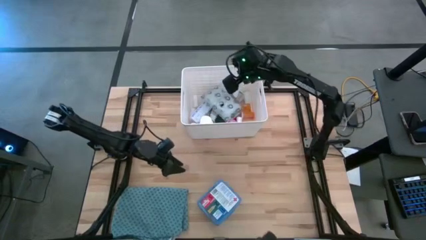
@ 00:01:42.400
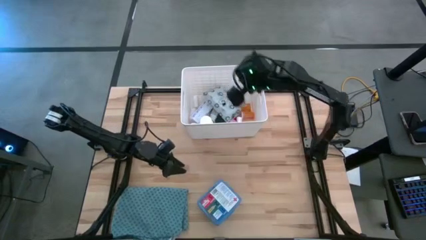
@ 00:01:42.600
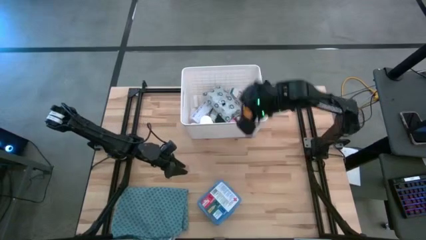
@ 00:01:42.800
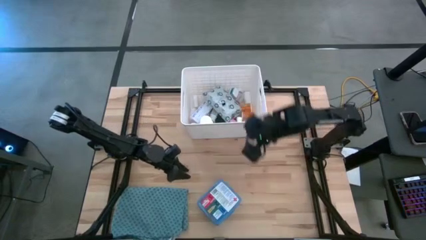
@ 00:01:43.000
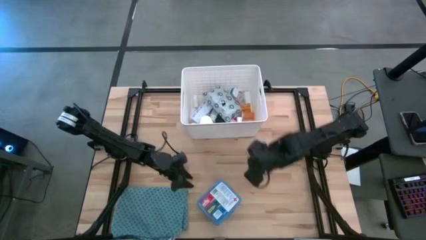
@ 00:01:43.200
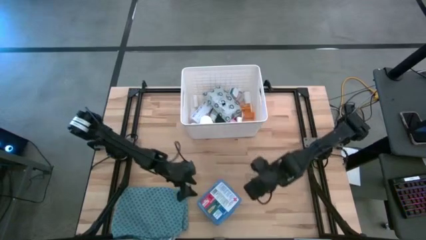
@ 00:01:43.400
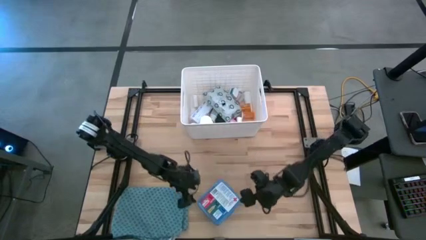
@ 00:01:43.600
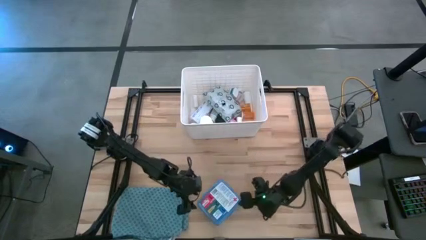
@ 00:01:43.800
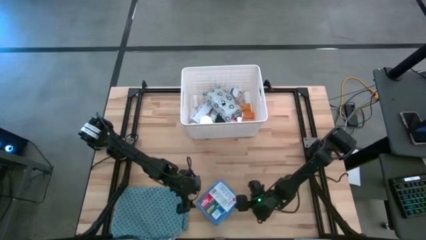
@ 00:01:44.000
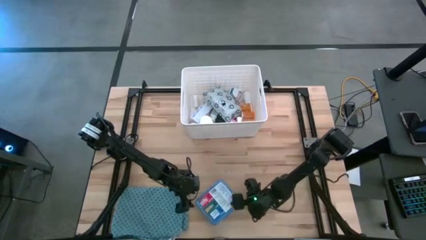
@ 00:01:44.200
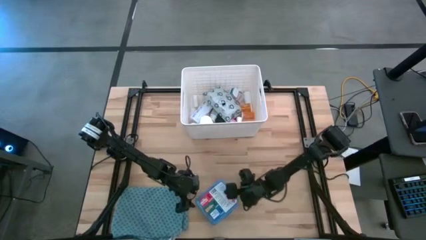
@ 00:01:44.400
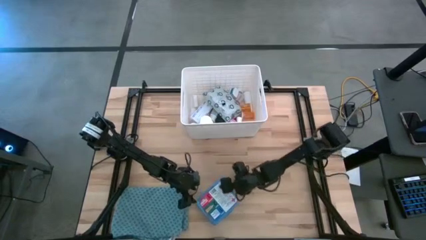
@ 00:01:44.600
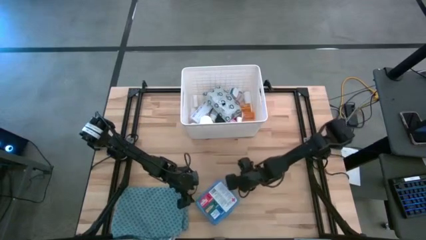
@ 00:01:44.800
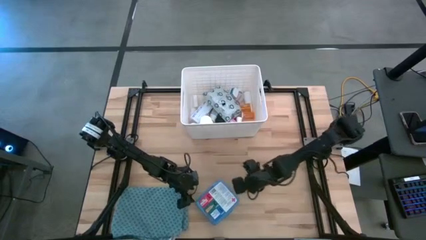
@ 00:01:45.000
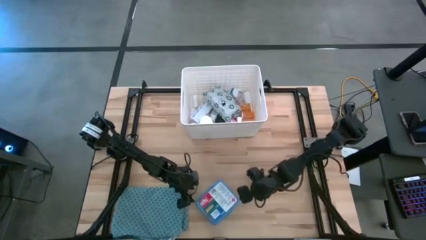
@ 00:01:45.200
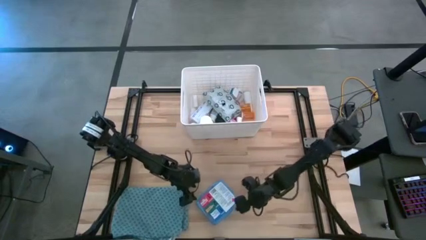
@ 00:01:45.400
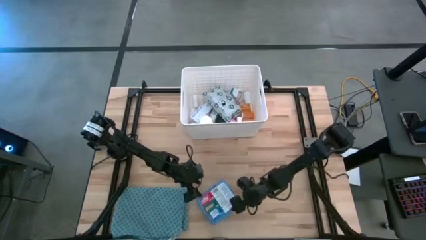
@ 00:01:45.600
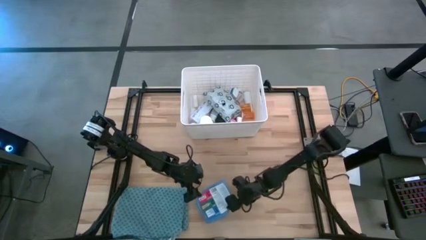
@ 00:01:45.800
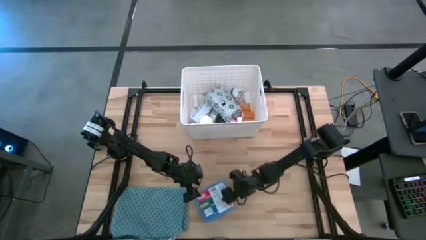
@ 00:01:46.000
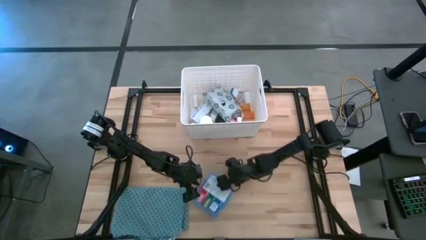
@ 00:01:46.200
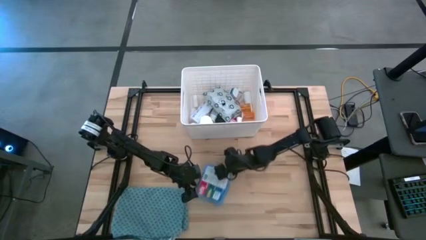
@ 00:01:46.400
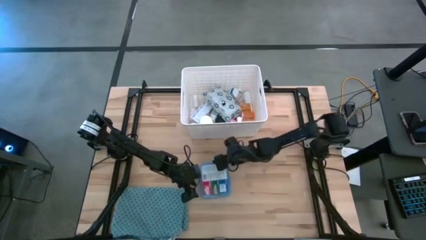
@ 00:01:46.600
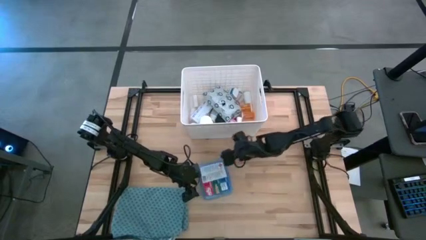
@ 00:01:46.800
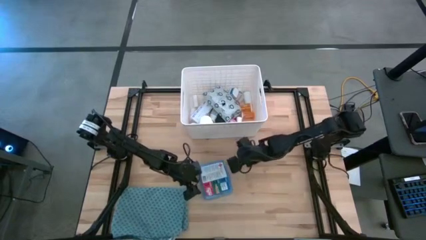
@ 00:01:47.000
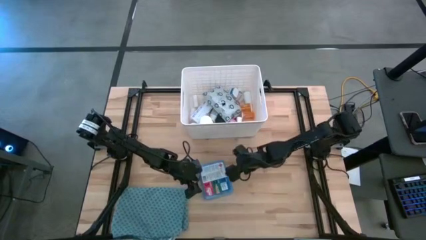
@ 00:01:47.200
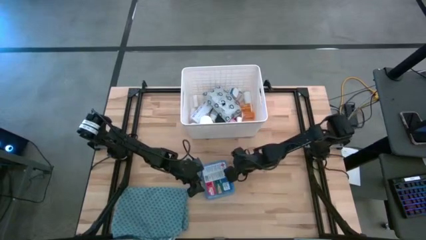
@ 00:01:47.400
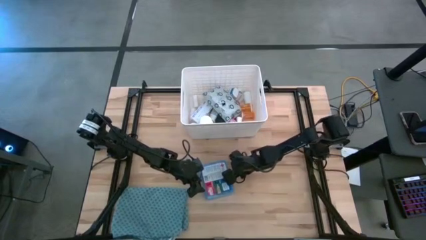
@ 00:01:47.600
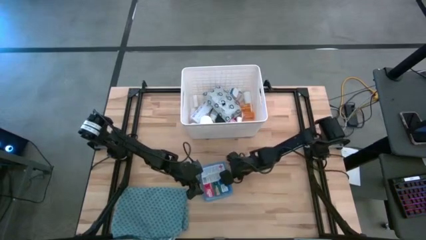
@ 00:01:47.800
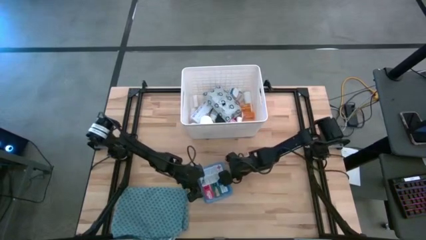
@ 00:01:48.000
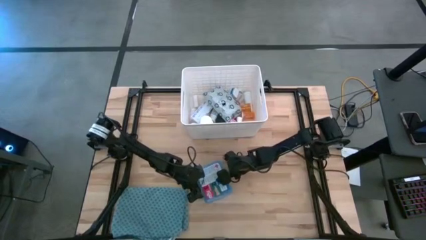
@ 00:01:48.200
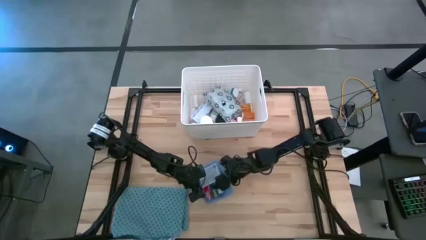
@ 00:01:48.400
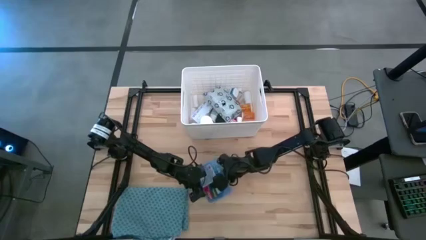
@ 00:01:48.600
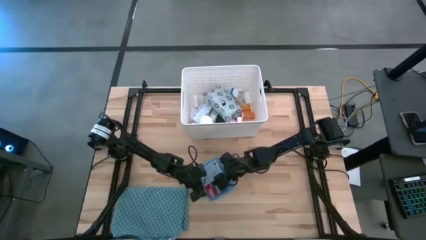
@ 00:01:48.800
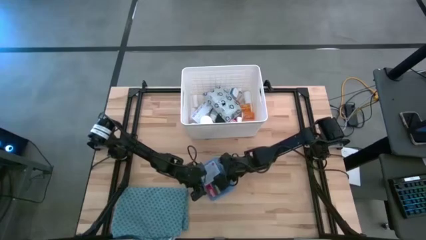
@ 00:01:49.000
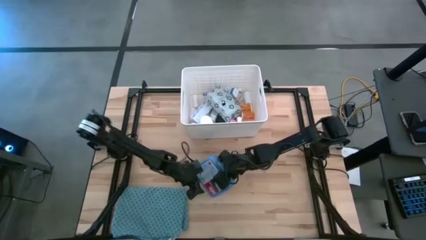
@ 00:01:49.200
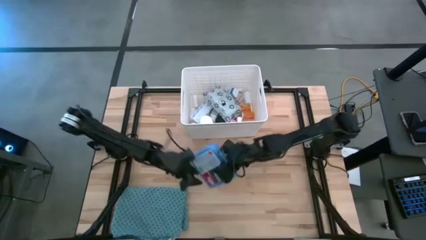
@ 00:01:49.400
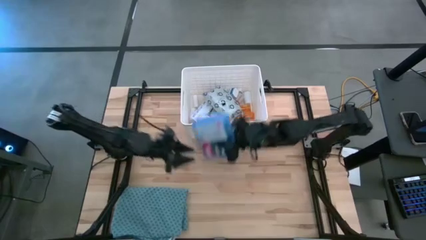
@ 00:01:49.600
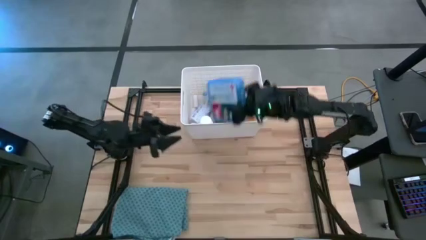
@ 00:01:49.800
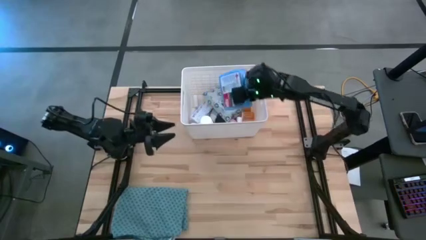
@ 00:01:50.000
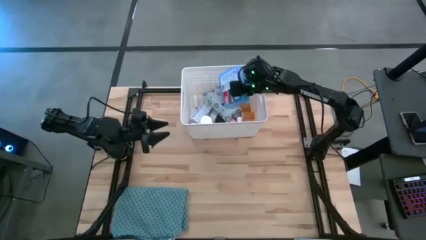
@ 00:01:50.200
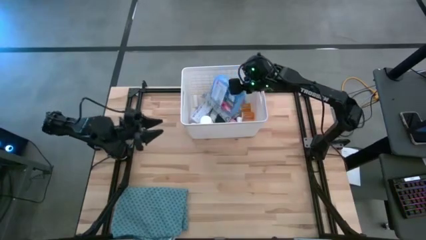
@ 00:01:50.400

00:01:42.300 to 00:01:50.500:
Task: Pick & place medical supplies in basket/bin
Put the first aid kit box into the bin

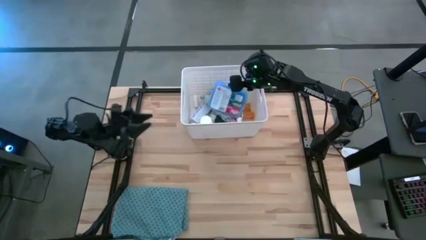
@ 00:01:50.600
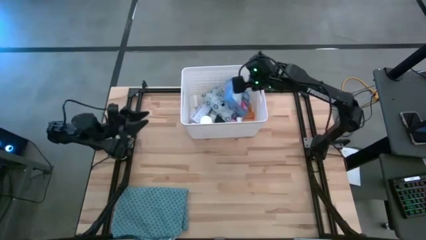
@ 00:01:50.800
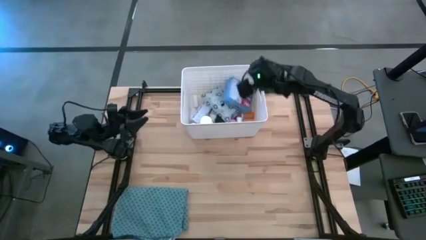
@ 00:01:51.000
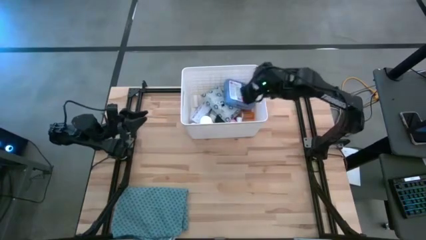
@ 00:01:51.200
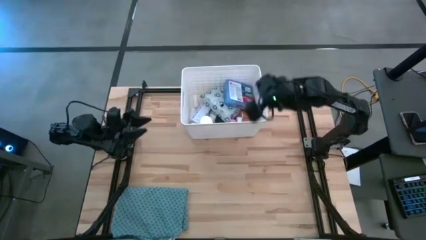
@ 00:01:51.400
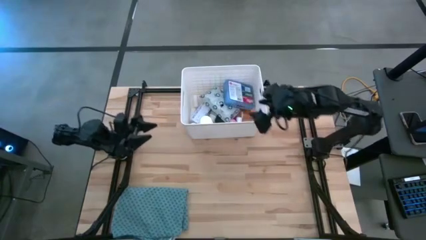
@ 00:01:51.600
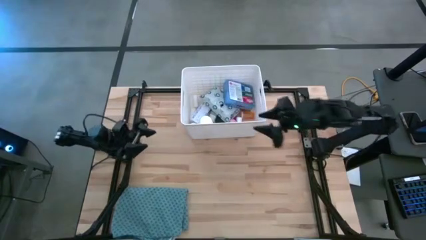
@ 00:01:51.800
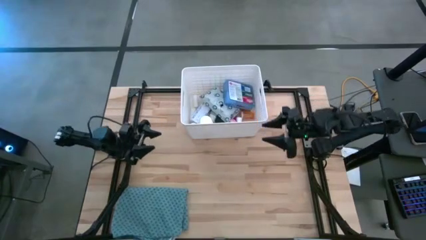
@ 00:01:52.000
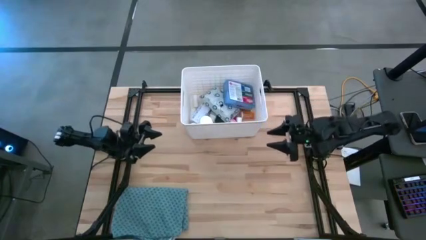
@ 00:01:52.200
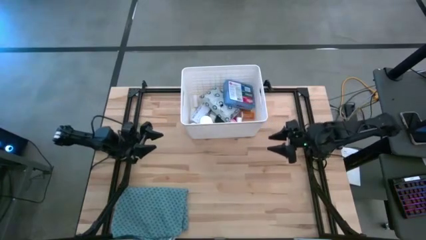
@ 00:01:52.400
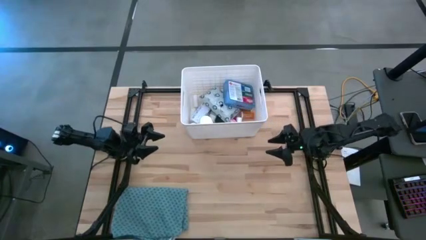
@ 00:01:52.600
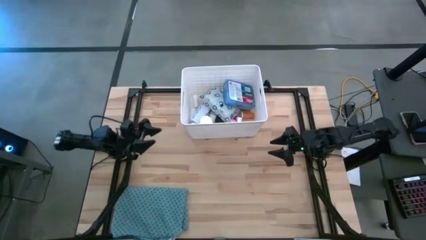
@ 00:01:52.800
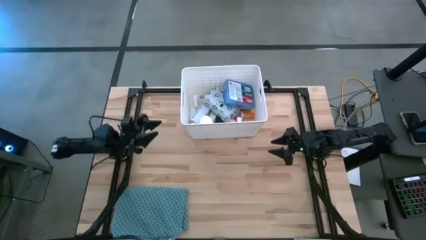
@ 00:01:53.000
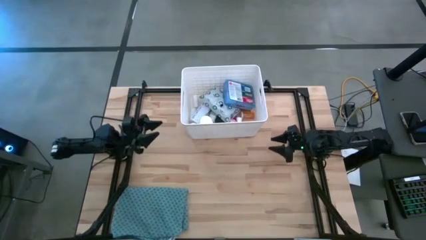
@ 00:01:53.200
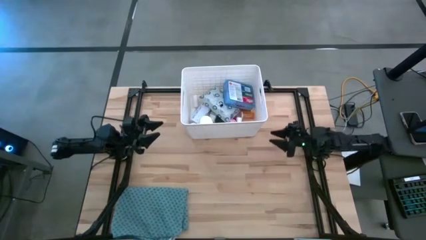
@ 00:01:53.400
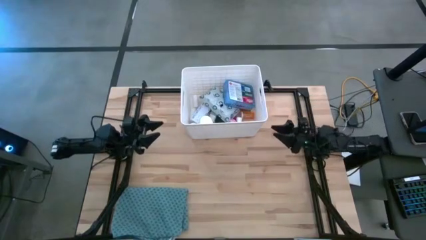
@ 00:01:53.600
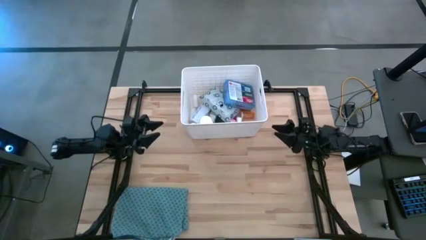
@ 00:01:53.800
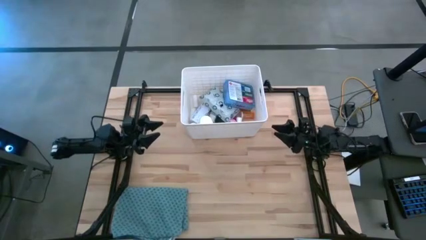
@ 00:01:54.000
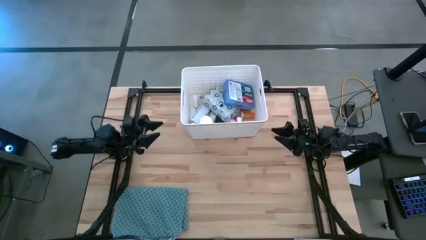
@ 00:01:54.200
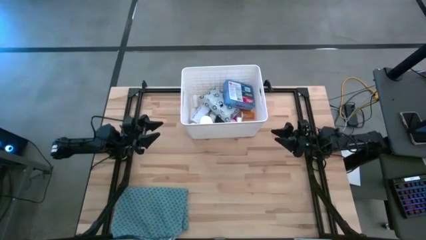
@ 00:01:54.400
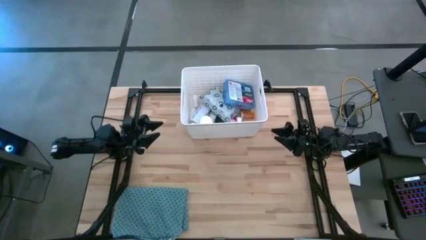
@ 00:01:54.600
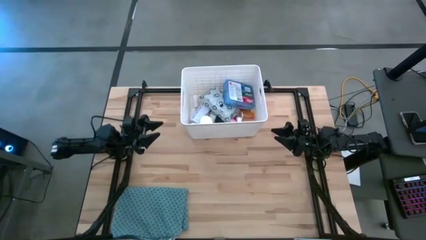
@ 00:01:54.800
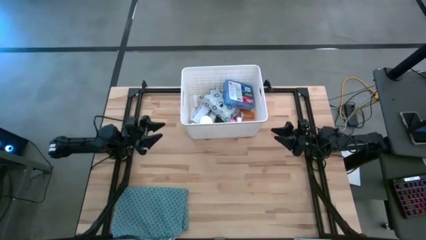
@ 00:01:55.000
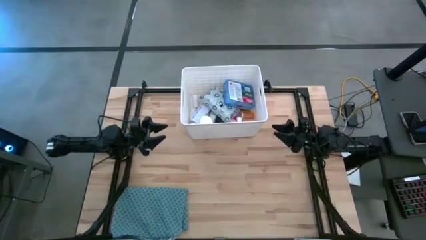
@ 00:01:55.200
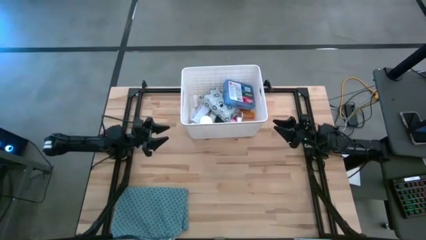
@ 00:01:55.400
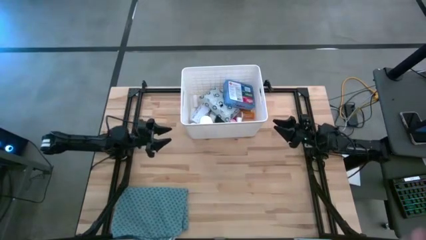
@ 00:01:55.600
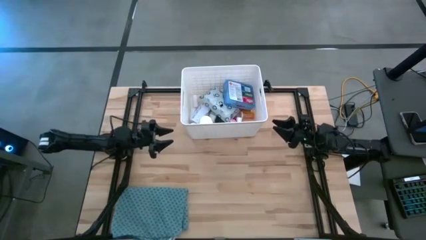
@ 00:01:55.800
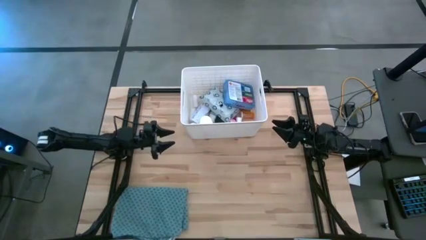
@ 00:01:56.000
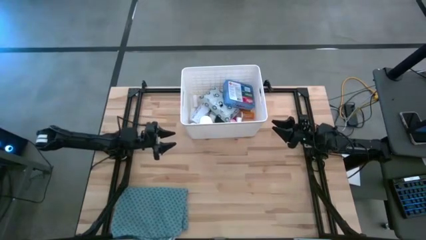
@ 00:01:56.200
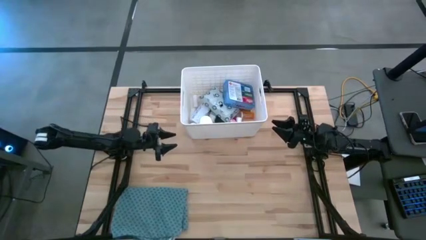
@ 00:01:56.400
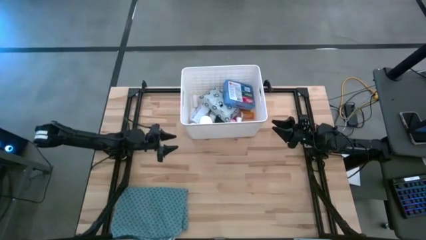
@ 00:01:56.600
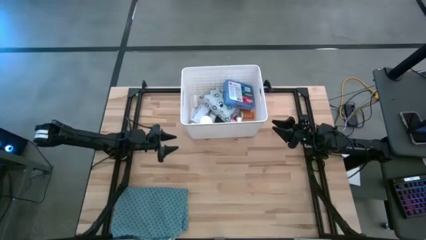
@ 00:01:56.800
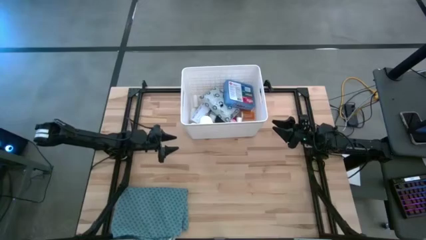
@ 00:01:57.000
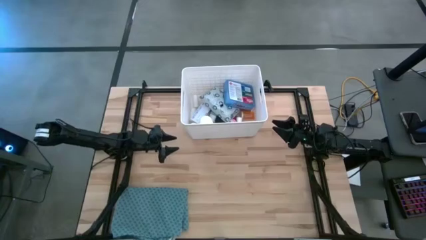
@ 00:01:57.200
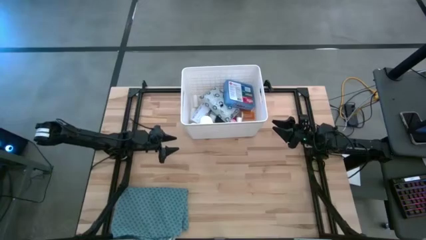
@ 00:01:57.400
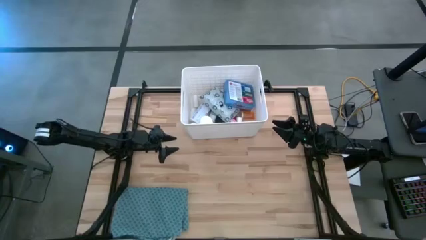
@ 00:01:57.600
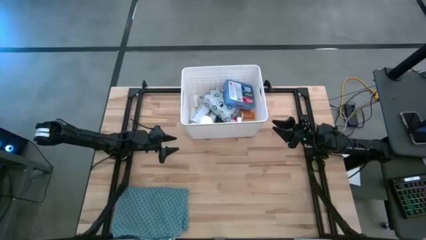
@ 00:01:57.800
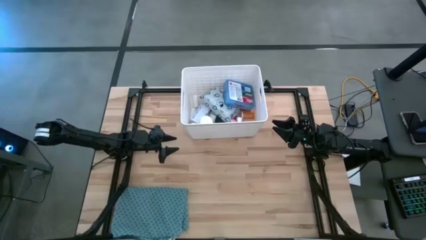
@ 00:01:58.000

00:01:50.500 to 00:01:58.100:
Return to Home Position
